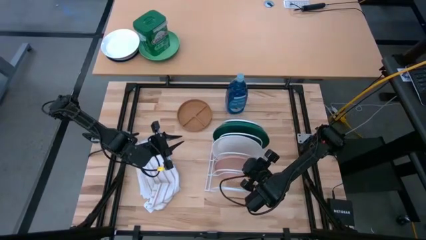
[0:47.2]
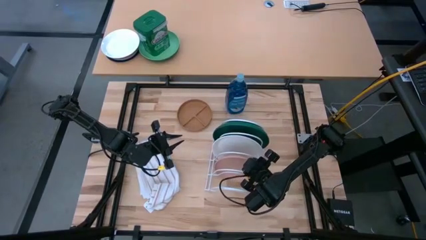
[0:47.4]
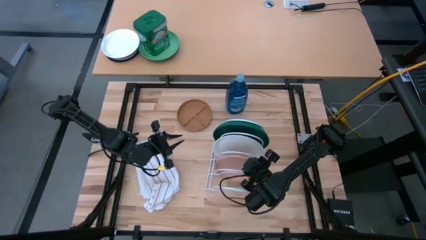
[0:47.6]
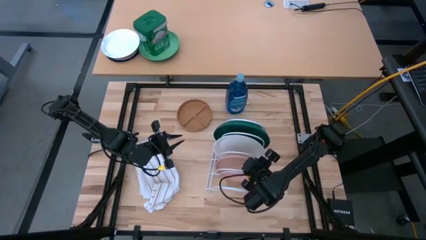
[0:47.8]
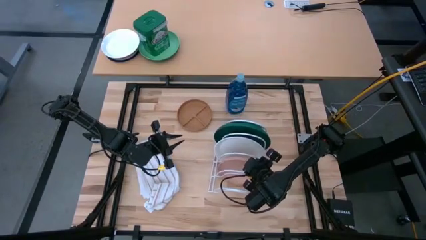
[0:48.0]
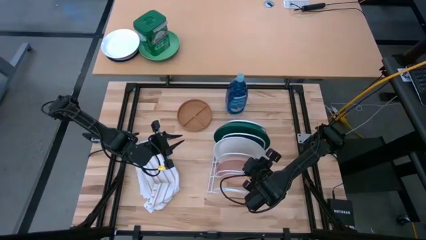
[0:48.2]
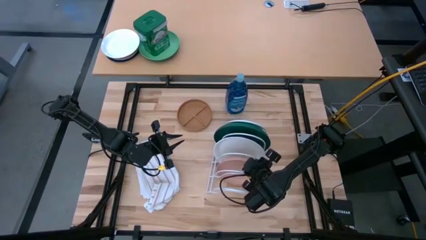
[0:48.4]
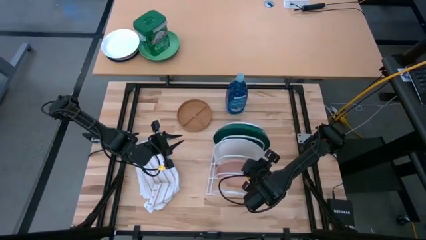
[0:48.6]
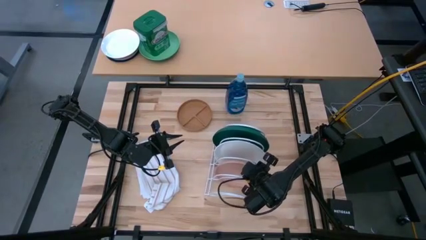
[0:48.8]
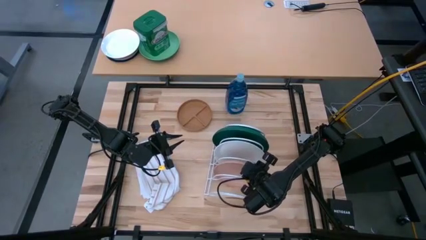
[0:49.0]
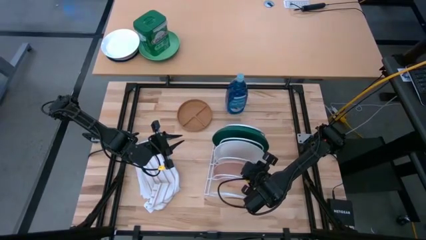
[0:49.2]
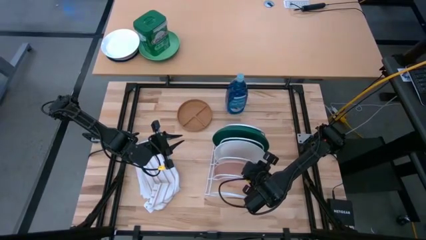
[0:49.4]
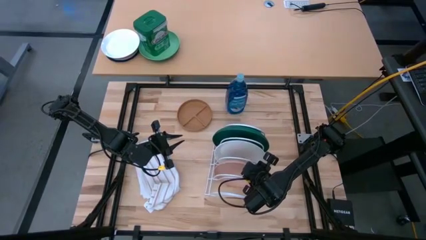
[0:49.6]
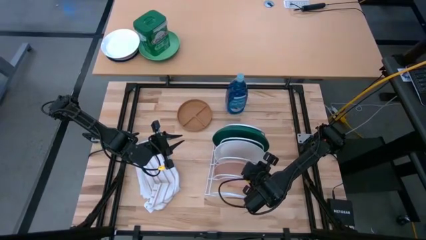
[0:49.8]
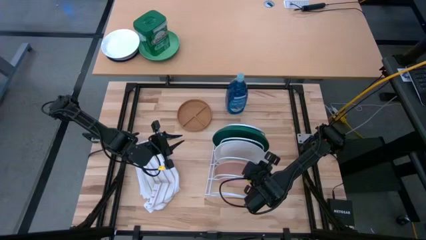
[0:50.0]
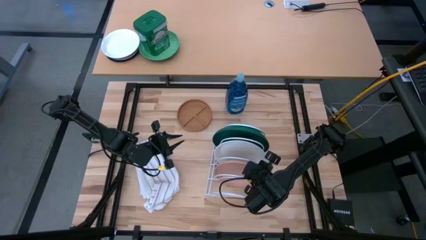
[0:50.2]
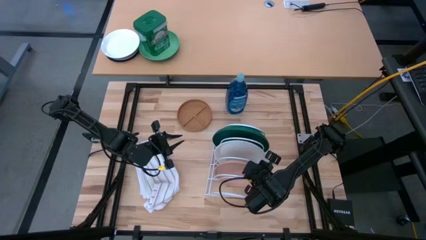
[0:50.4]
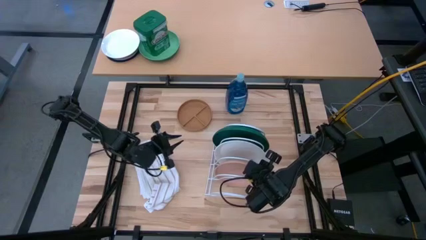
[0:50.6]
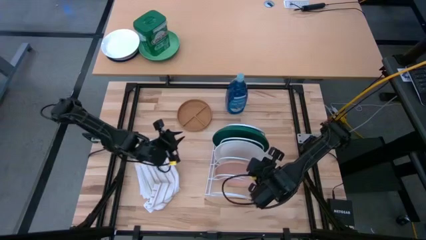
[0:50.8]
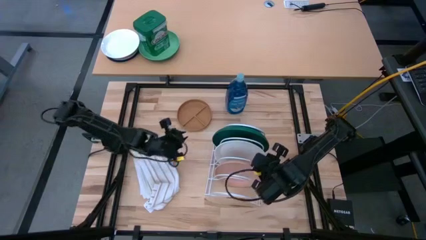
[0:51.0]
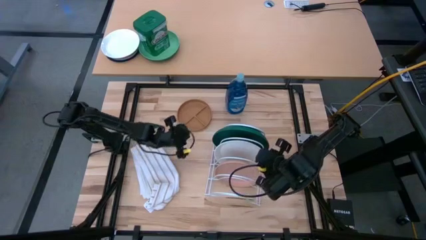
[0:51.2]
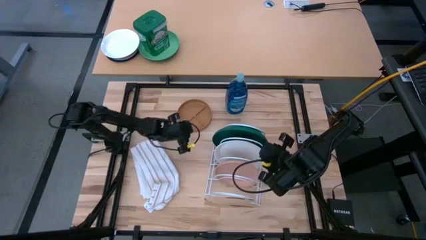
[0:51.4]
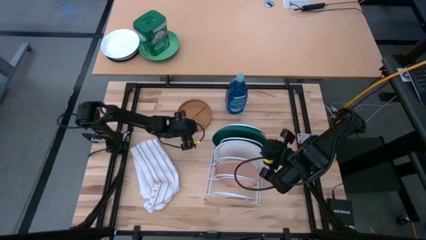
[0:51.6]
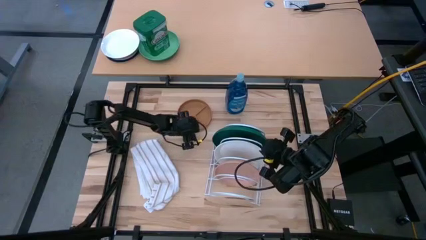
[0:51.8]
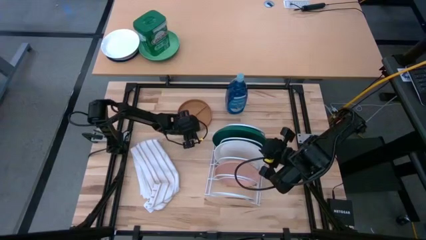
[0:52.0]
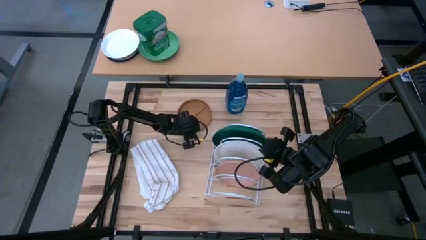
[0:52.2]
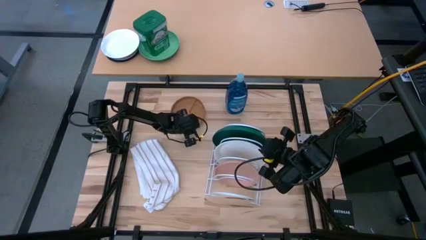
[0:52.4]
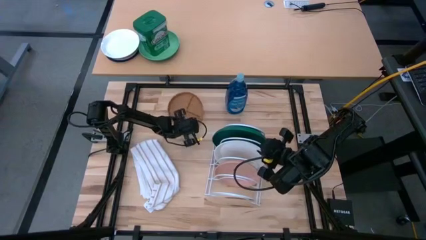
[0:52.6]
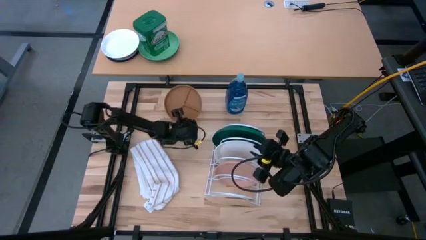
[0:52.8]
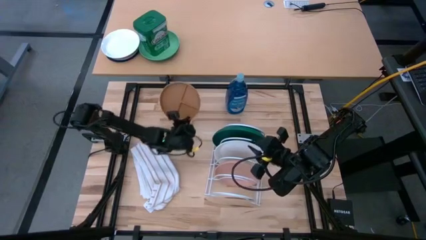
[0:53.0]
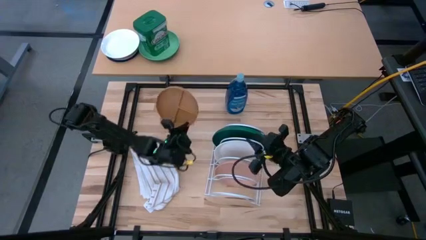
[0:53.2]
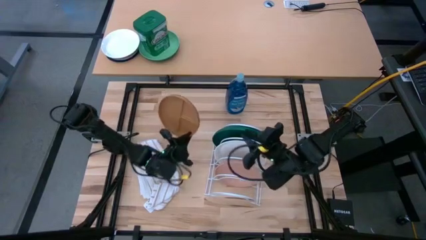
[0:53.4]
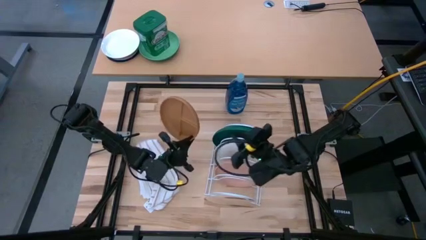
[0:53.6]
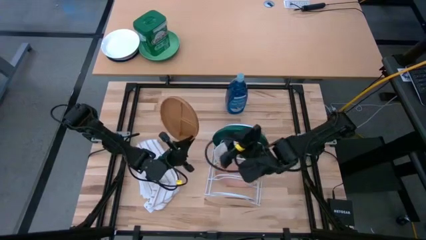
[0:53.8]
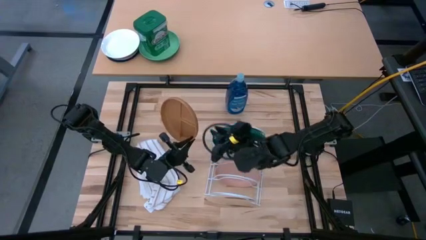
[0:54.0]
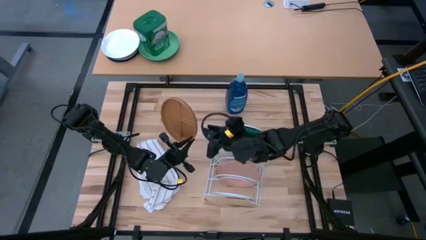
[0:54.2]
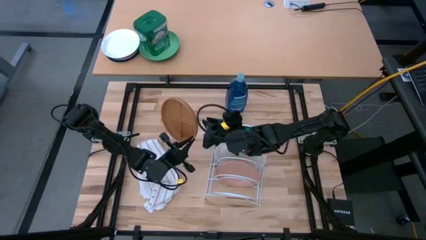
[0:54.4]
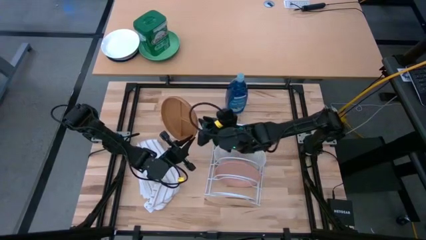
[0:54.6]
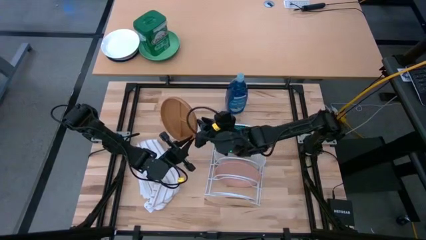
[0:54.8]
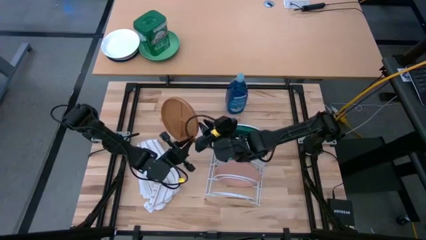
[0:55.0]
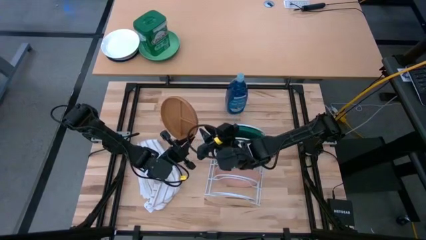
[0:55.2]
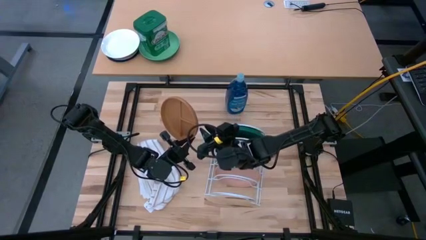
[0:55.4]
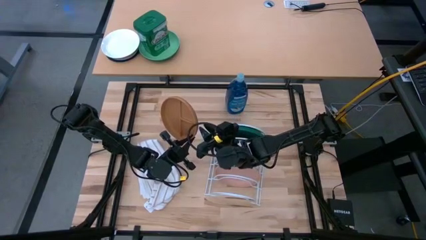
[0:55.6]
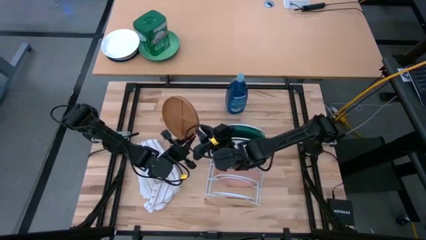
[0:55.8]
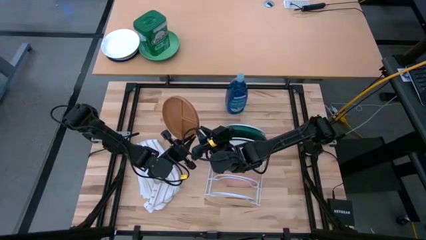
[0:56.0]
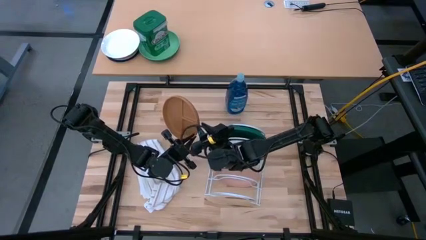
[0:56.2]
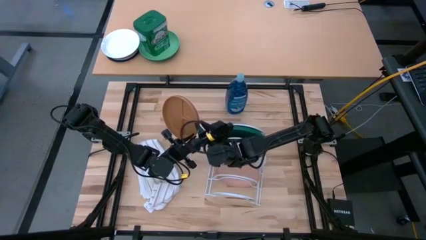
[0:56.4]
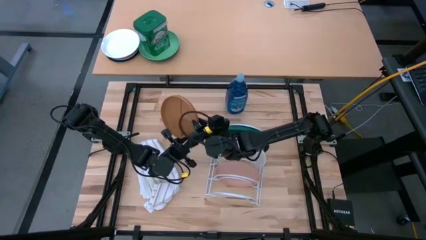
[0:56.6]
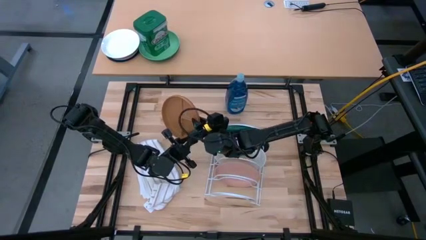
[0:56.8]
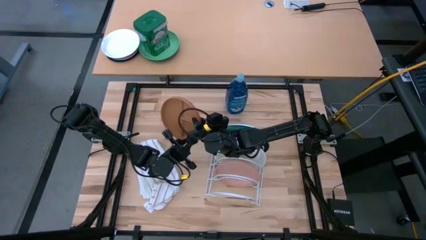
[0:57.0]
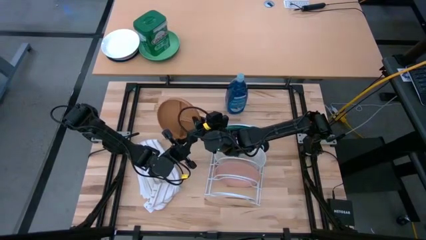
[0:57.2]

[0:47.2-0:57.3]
Task: Sort dishes
Put the brown plate in the dish rack
